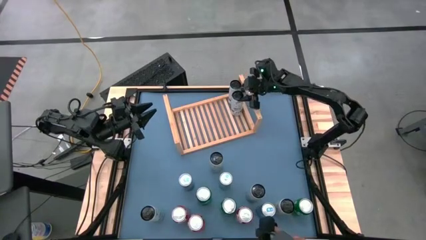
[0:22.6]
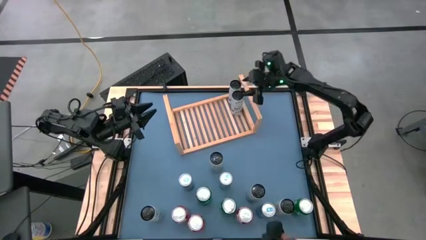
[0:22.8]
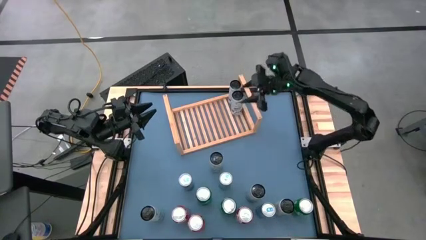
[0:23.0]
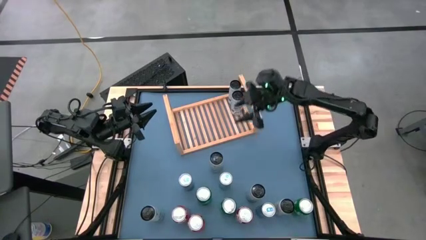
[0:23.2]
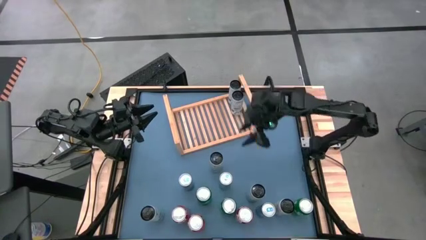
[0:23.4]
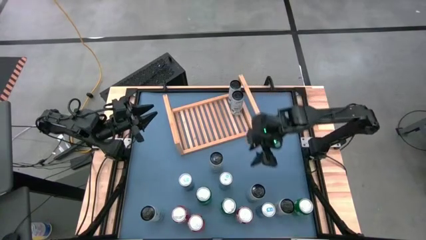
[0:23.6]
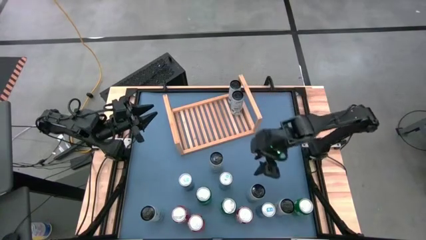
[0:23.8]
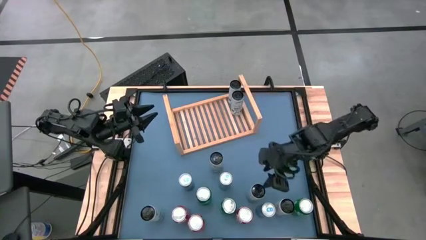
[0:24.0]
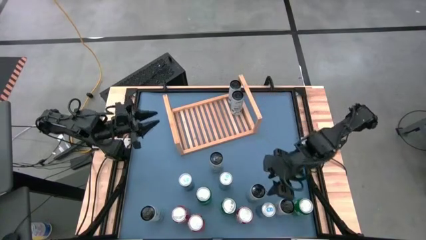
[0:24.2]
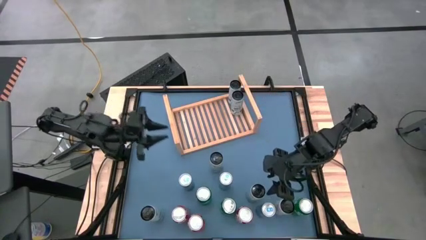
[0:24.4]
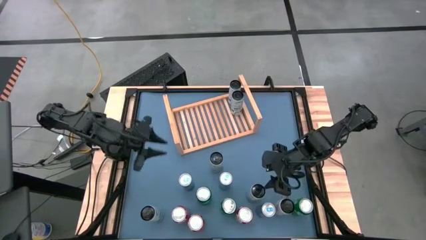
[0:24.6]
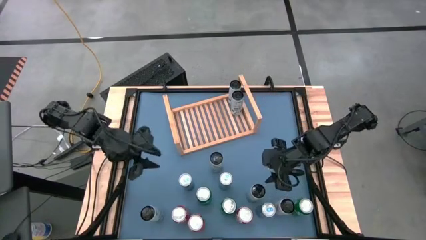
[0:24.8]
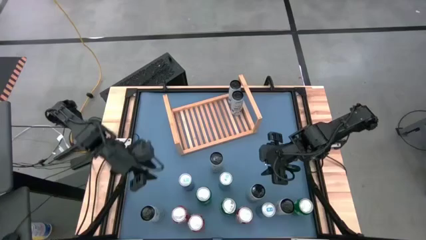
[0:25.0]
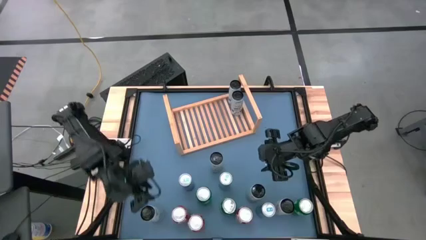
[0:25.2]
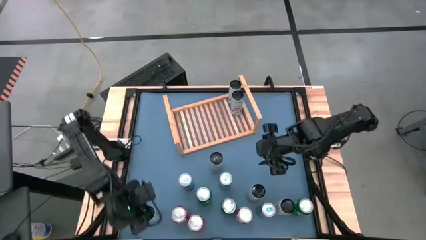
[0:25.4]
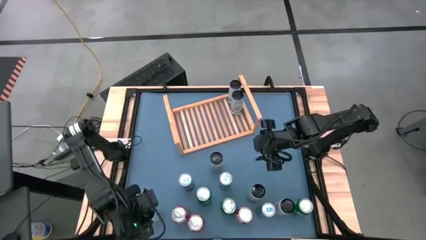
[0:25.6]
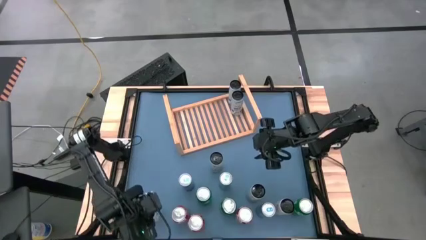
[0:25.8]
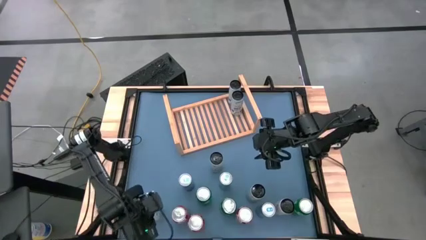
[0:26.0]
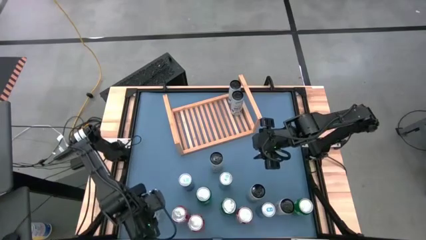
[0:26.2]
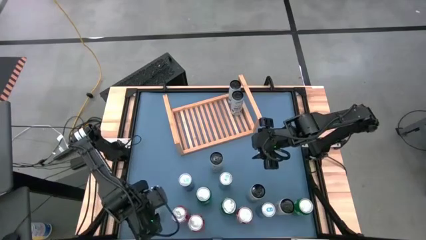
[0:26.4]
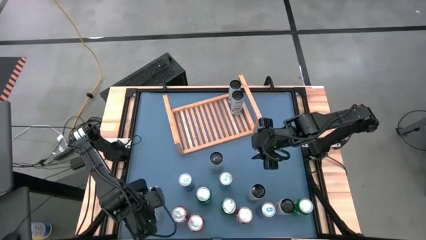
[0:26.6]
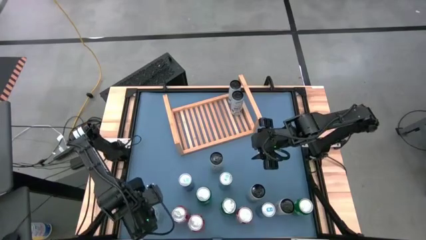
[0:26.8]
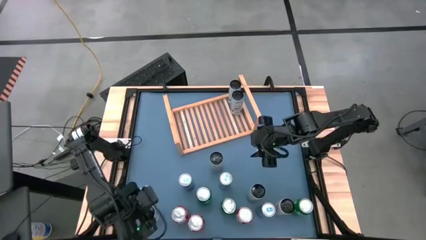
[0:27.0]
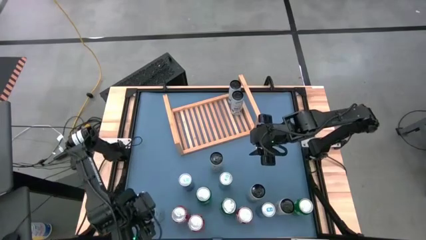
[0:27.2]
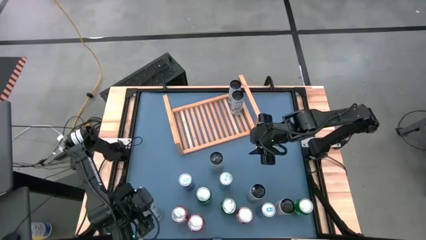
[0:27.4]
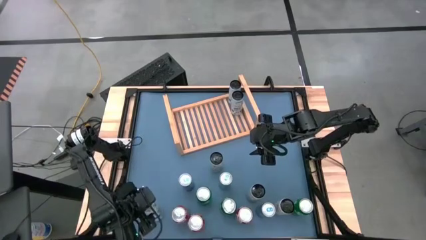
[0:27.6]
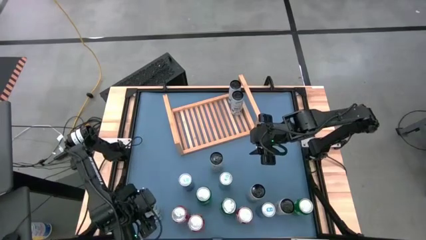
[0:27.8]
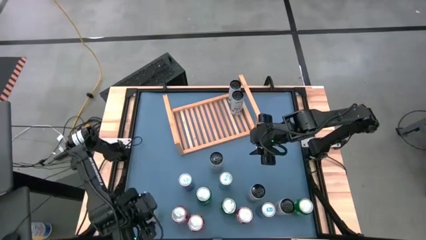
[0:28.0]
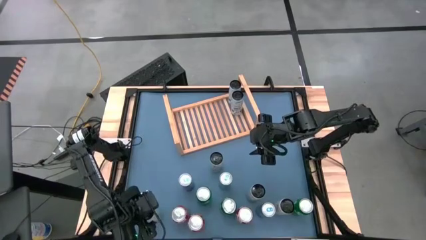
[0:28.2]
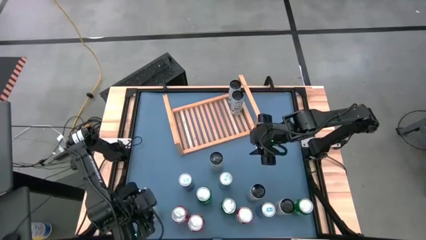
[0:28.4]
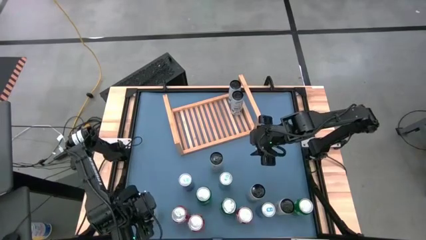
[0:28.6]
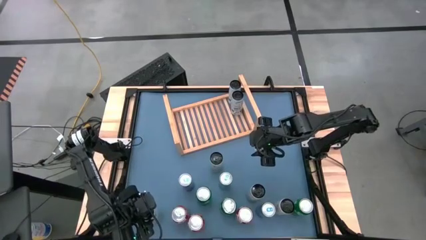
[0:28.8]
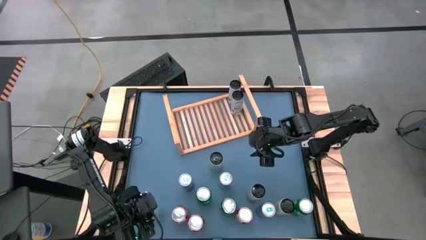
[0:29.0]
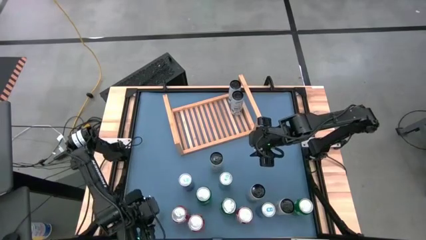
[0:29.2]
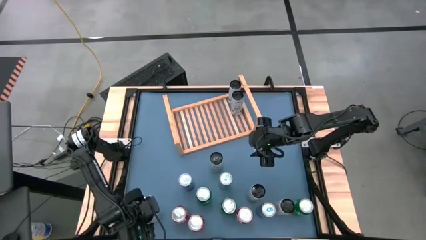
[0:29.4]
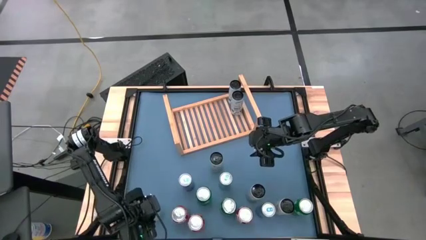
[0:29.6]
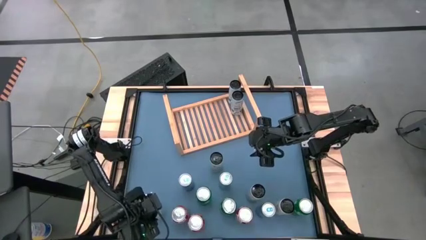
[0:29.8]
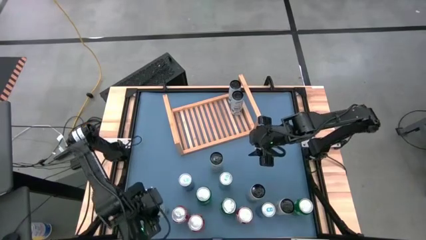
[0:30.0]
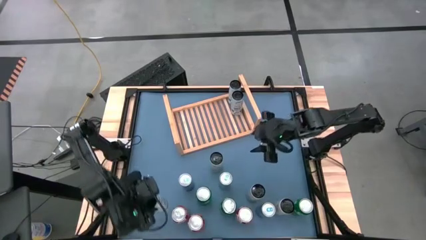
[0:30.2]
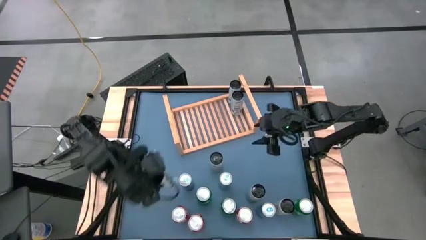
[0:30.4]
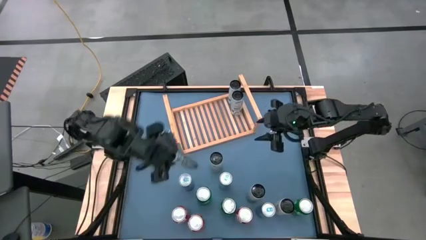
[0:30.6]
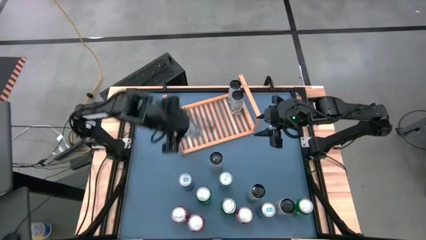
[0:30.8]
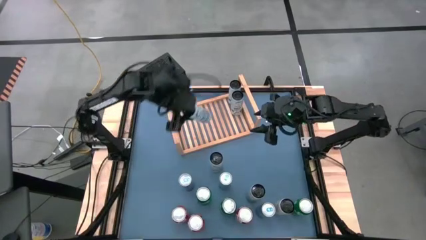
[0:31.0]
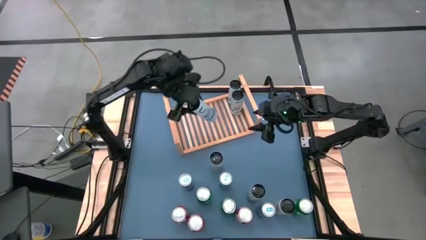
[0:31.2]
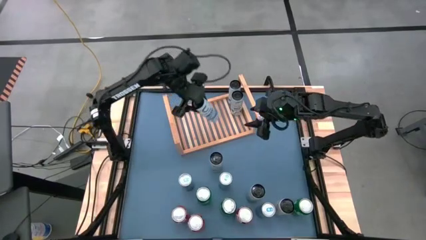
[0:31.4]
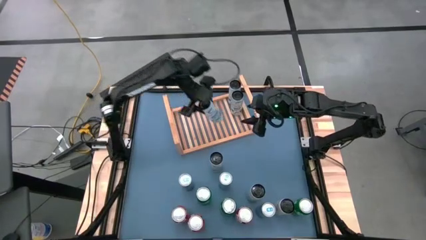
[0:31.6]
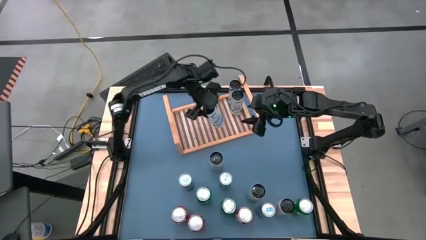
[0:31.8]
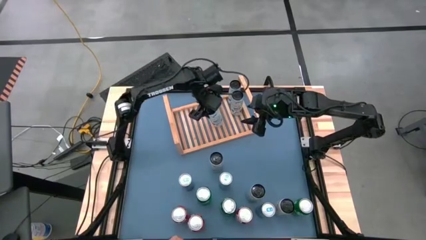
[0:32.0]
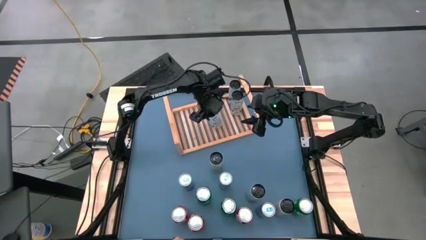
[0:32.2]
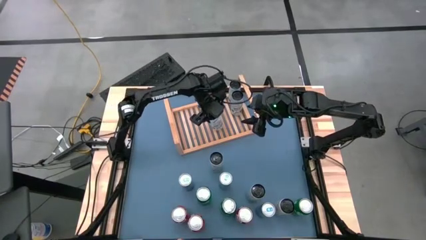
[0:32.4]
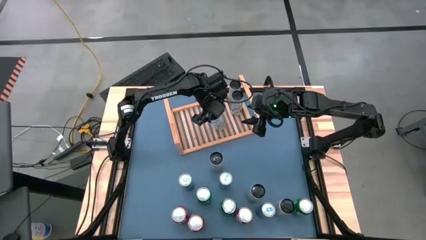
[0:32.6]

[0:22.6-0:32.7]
Task: Place canned beverage on shelf
Put the white-blue soda can on the shelf aligned with the other white-blue soda cans

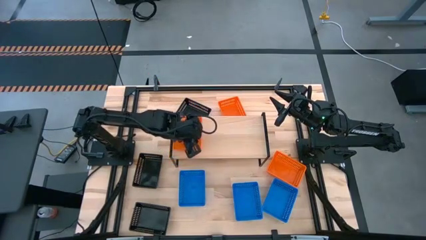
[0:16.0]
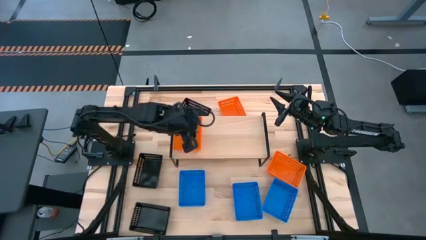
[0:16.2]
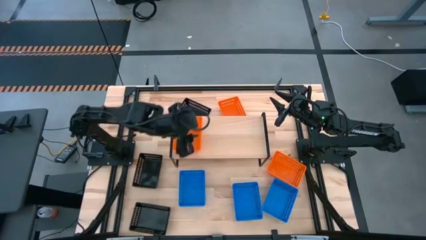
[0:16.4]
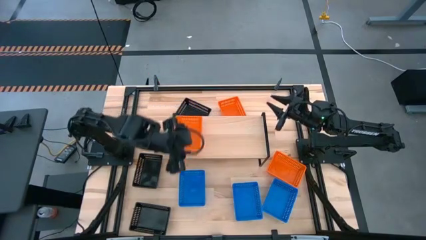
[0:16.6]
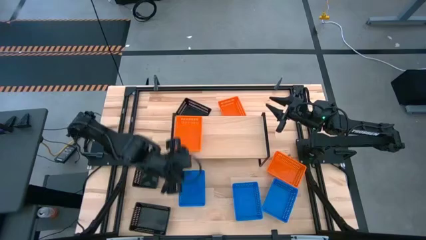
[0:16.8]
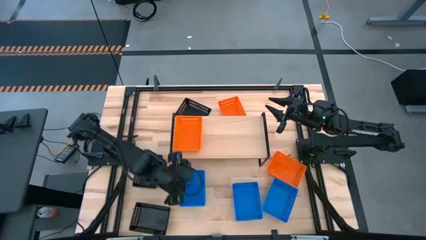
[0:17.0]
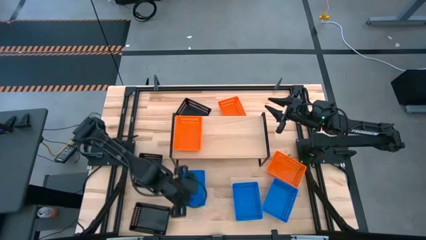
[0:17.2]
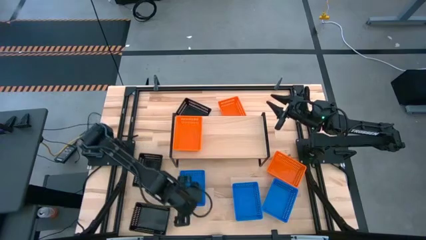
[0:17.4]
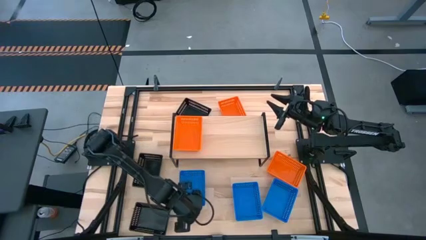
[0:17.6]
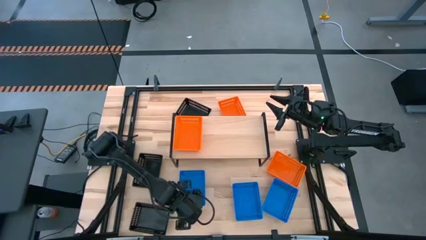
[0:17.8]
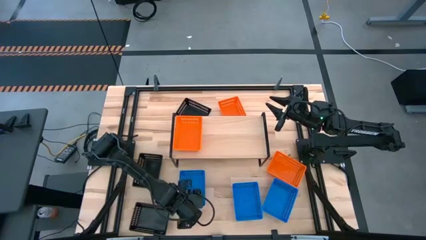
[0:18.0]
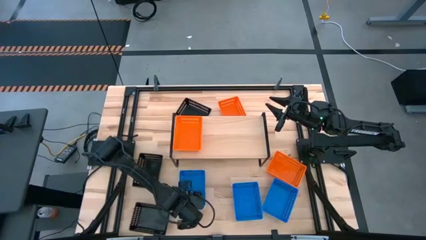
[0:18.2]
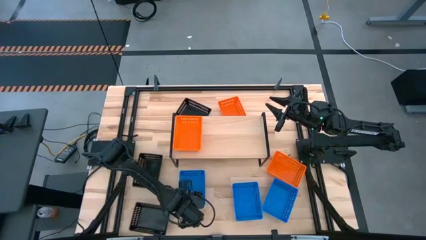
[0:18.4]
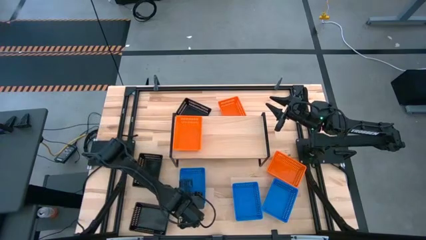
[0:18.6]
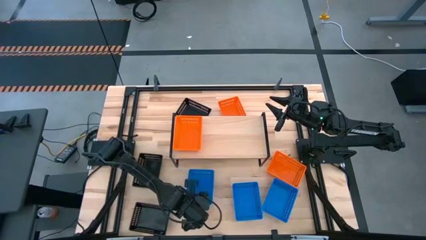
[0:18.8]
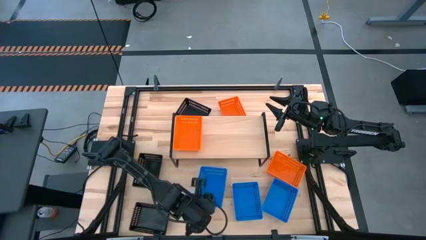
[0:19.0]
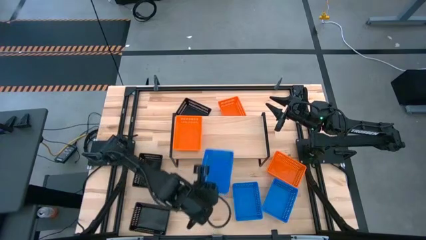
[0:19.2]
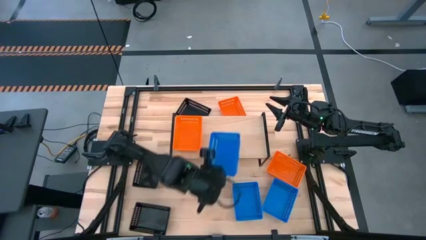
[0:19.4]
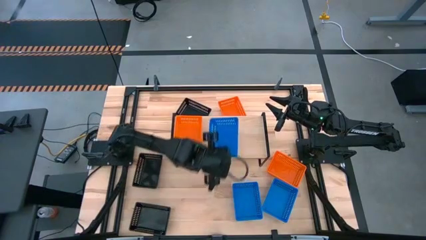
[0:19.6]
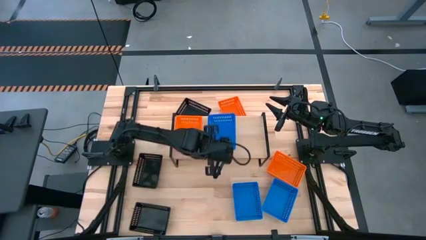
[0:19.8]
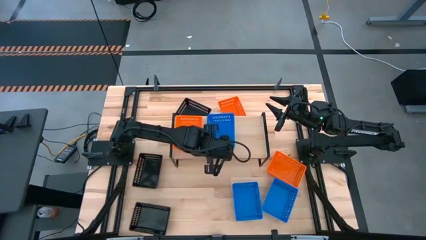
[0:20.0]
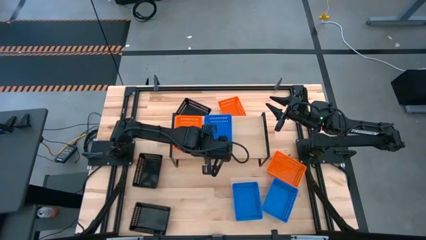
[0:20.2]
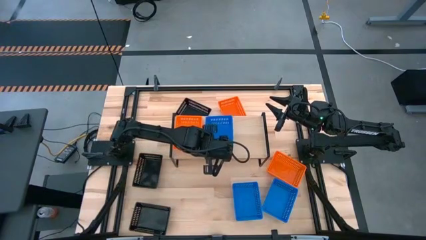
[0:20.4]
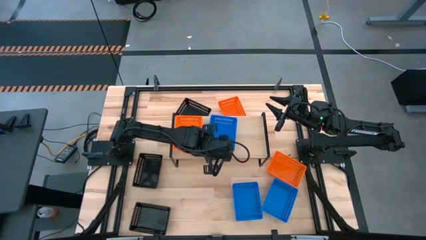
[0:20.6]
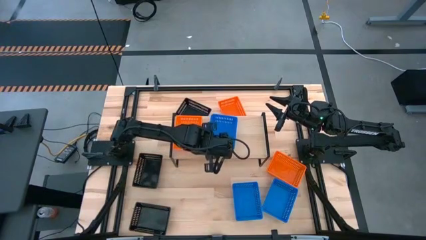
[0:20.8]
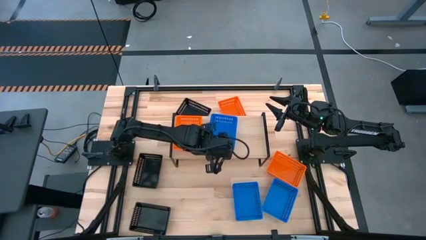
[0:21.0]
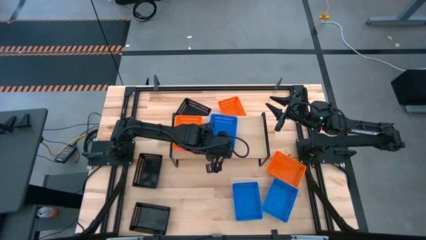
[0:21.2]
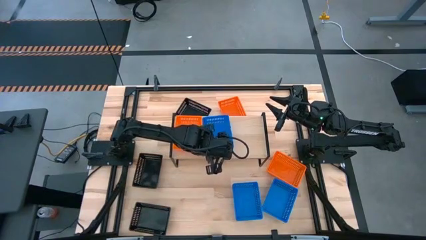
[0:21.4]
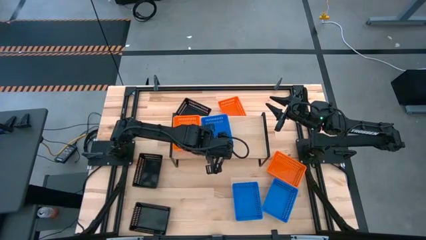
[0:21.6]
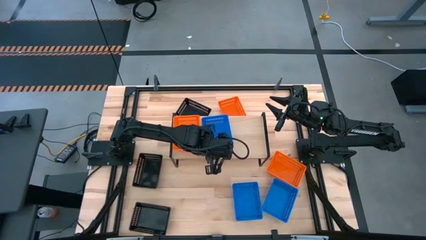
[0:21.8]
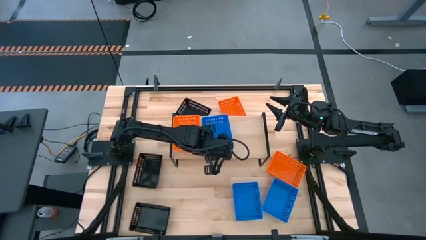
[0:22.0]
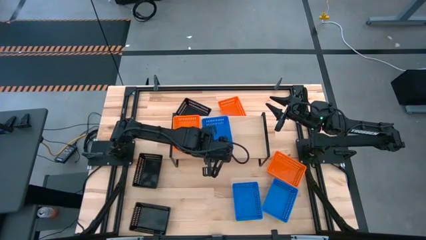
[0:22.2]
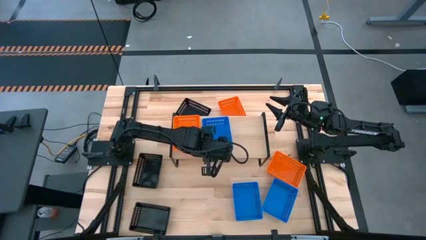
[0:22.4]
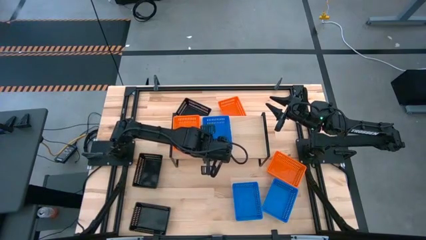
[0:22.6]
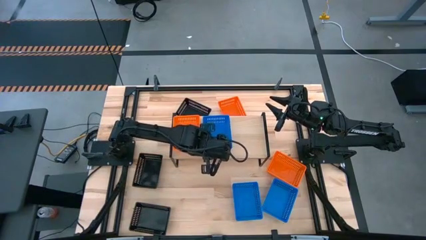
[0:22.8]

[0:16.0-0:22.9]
Task: Stack baskets on shelf by color
Put the left blue bin on the shelf
